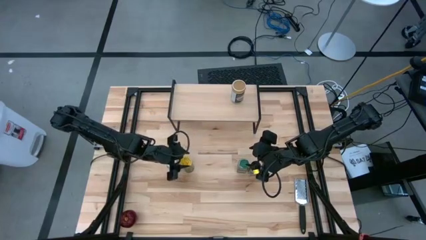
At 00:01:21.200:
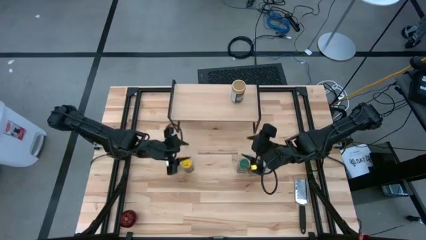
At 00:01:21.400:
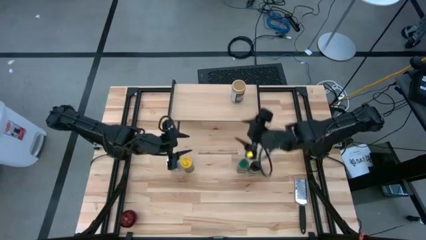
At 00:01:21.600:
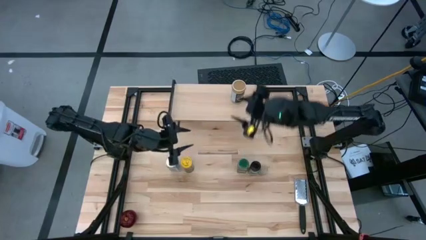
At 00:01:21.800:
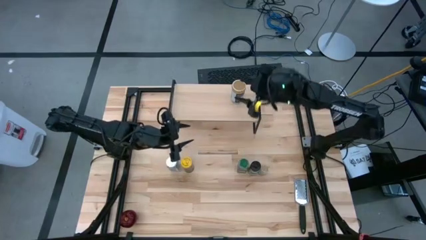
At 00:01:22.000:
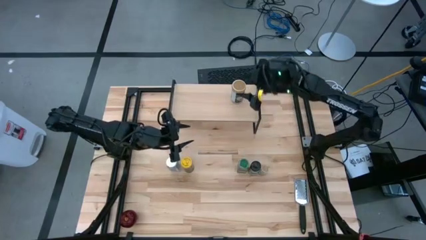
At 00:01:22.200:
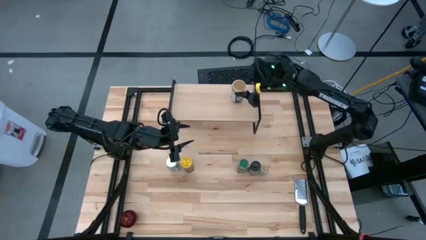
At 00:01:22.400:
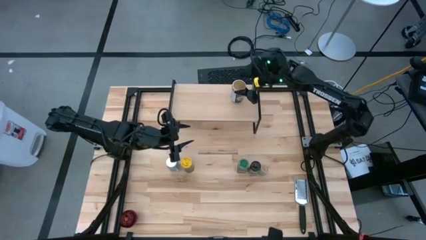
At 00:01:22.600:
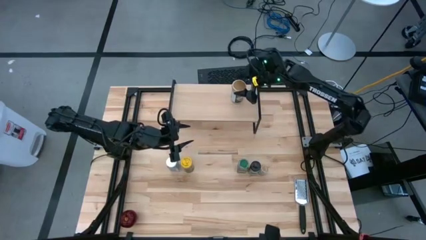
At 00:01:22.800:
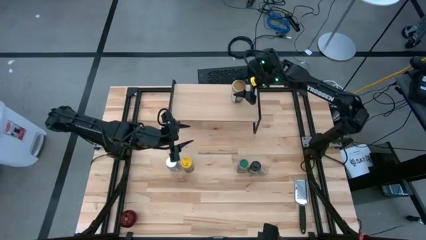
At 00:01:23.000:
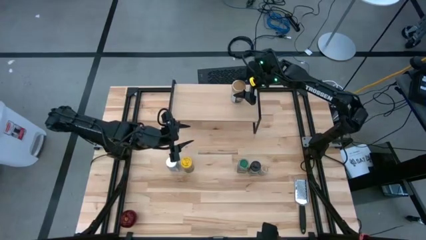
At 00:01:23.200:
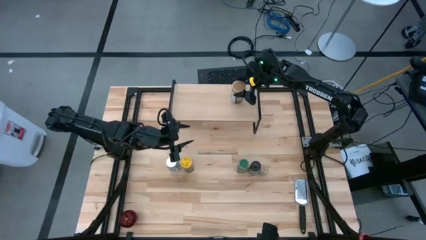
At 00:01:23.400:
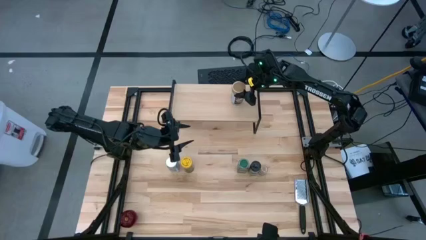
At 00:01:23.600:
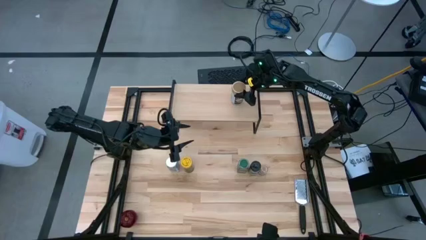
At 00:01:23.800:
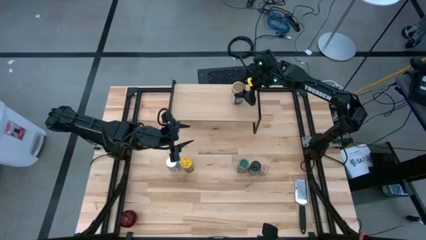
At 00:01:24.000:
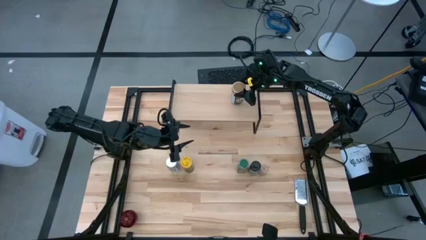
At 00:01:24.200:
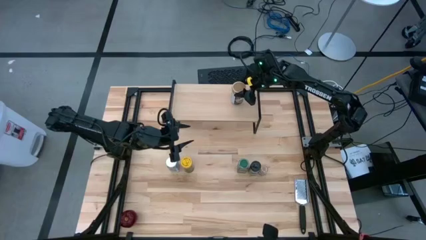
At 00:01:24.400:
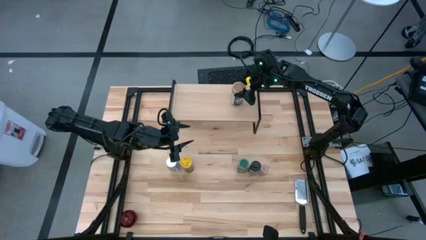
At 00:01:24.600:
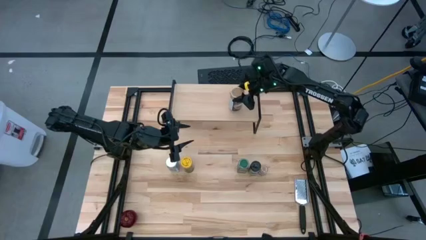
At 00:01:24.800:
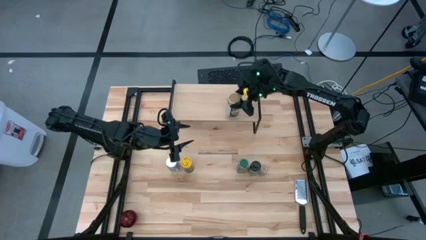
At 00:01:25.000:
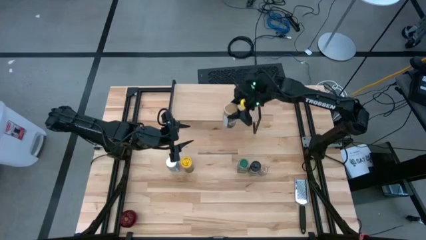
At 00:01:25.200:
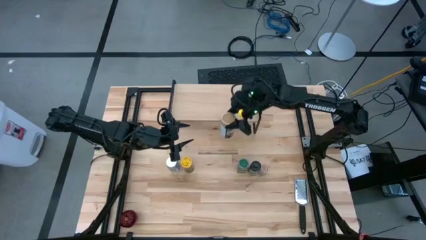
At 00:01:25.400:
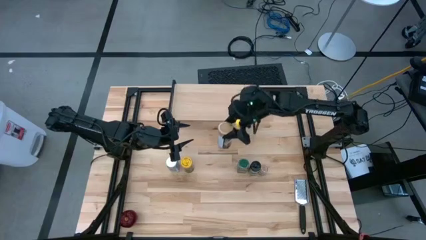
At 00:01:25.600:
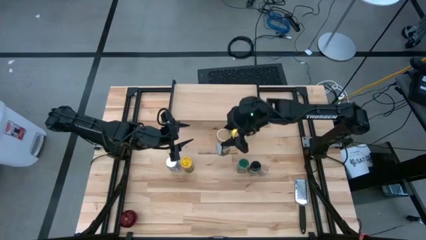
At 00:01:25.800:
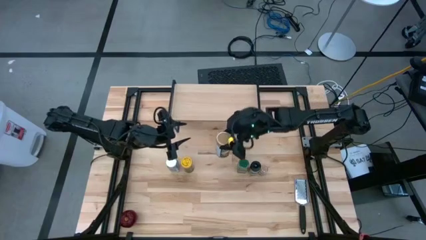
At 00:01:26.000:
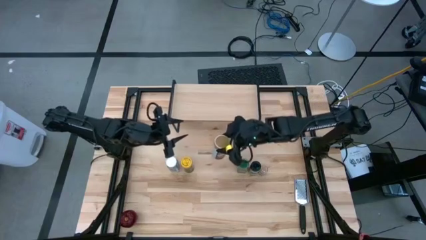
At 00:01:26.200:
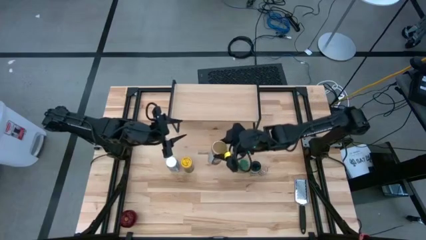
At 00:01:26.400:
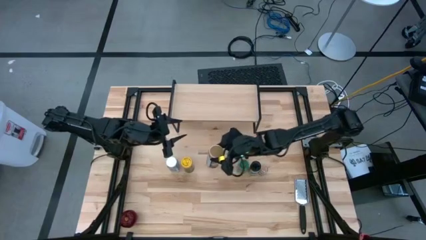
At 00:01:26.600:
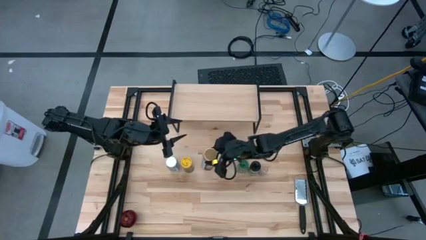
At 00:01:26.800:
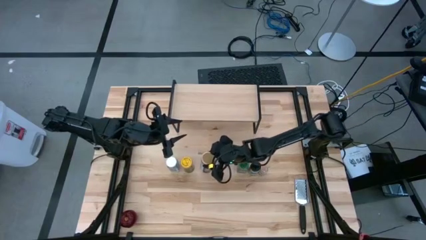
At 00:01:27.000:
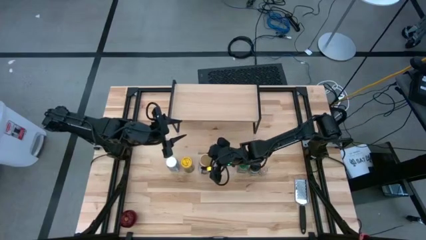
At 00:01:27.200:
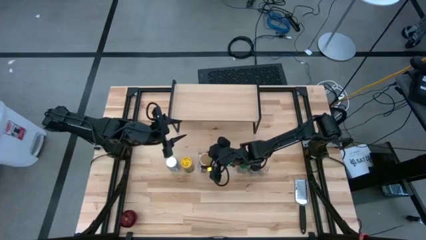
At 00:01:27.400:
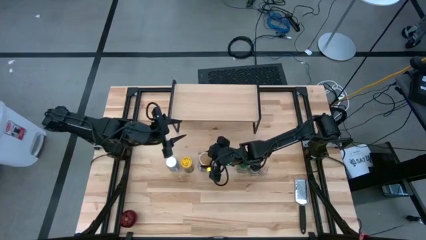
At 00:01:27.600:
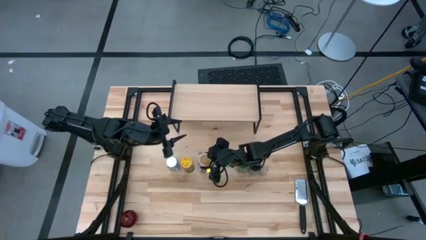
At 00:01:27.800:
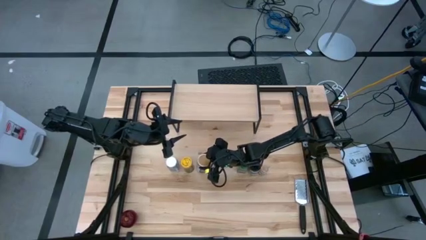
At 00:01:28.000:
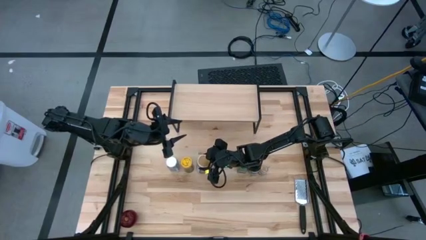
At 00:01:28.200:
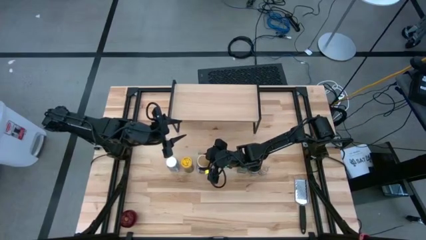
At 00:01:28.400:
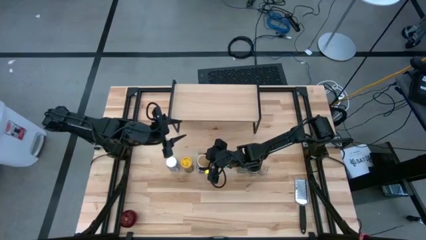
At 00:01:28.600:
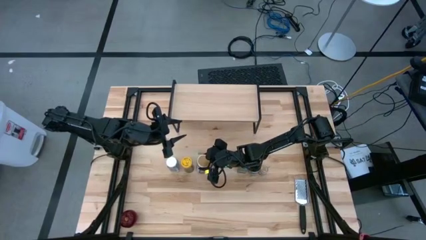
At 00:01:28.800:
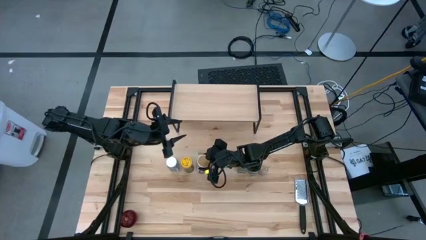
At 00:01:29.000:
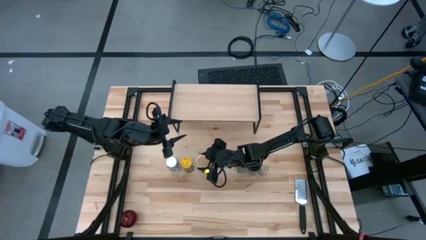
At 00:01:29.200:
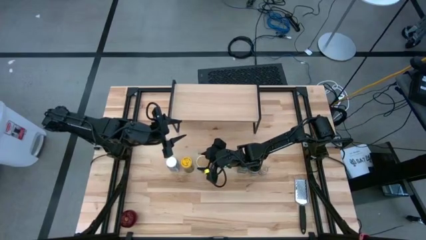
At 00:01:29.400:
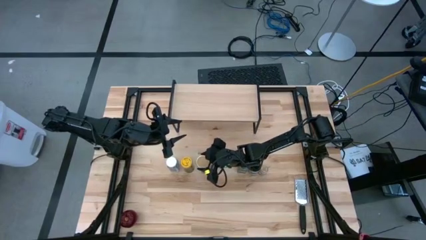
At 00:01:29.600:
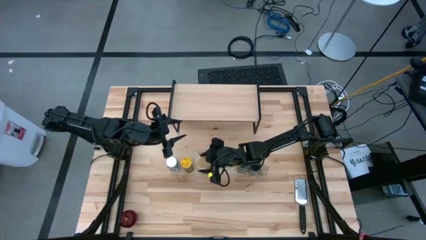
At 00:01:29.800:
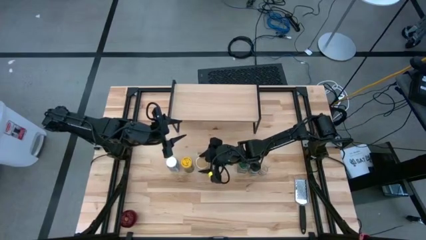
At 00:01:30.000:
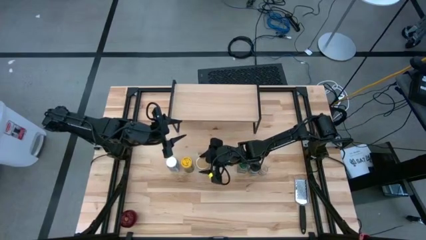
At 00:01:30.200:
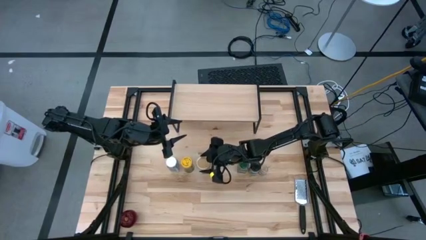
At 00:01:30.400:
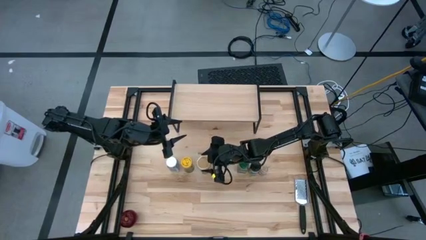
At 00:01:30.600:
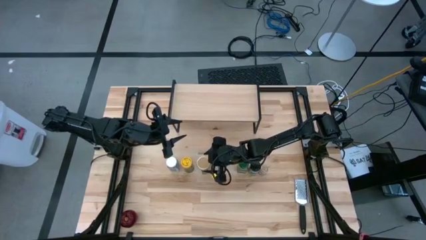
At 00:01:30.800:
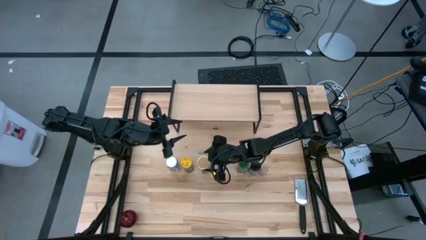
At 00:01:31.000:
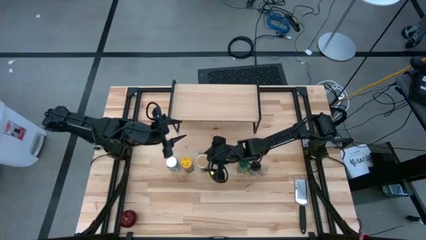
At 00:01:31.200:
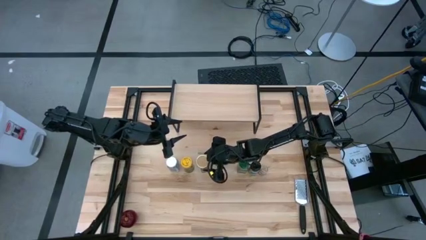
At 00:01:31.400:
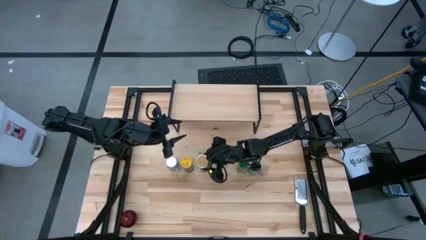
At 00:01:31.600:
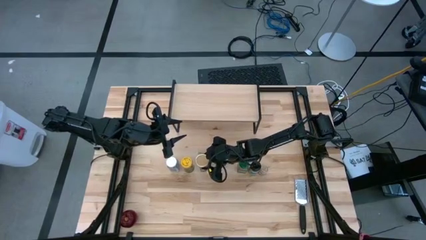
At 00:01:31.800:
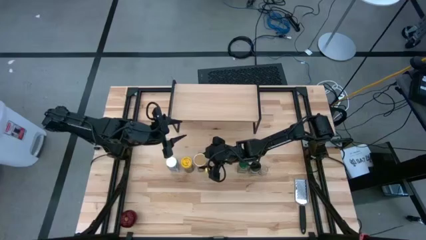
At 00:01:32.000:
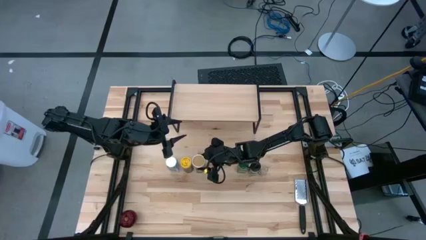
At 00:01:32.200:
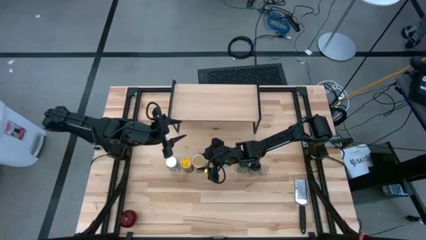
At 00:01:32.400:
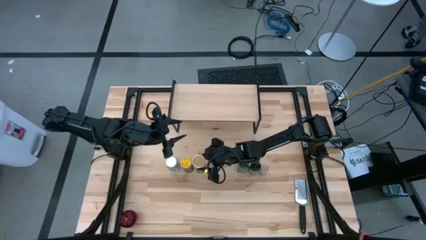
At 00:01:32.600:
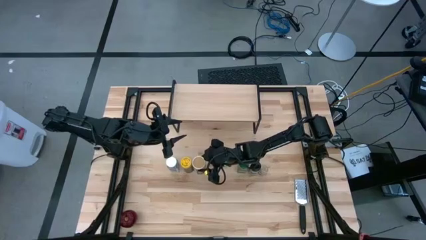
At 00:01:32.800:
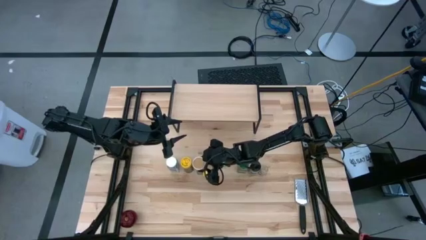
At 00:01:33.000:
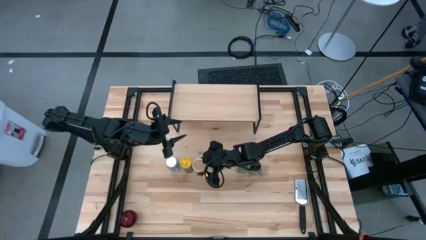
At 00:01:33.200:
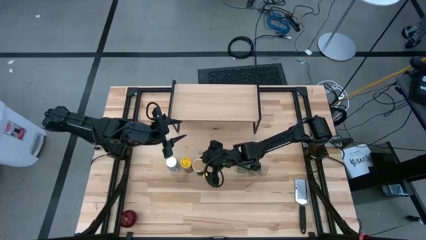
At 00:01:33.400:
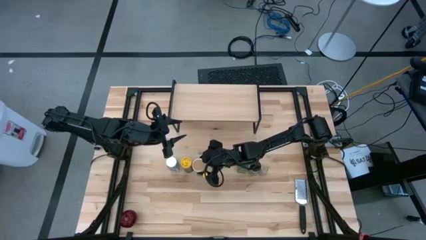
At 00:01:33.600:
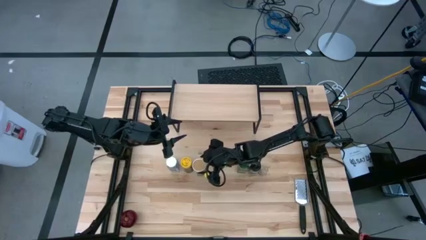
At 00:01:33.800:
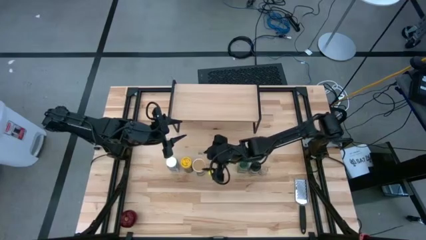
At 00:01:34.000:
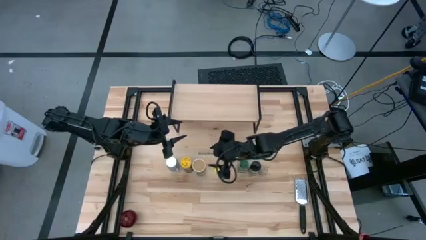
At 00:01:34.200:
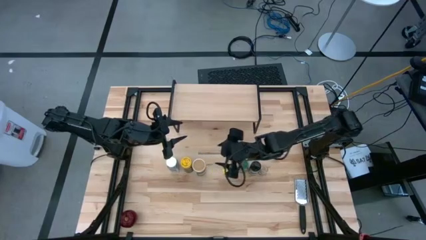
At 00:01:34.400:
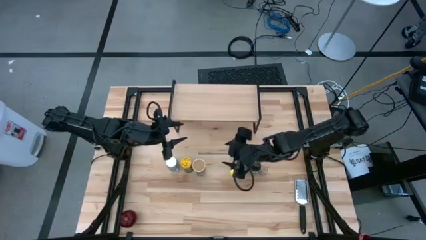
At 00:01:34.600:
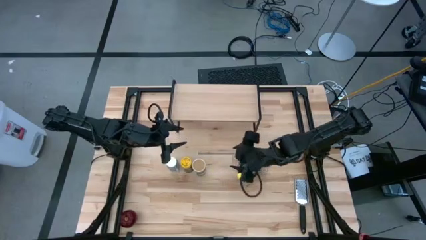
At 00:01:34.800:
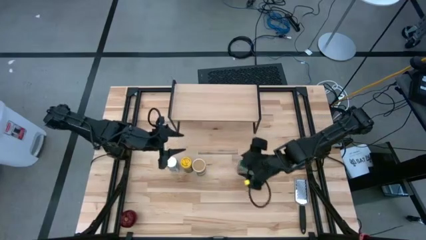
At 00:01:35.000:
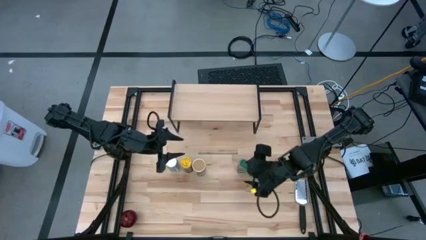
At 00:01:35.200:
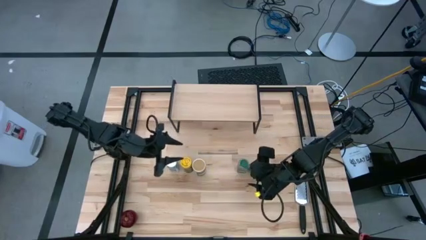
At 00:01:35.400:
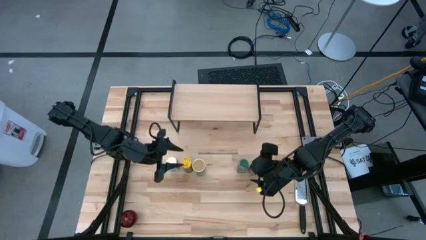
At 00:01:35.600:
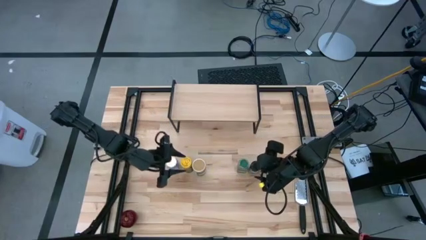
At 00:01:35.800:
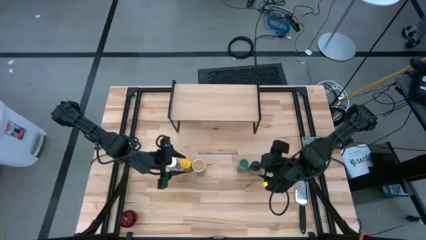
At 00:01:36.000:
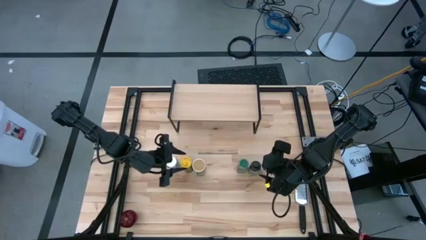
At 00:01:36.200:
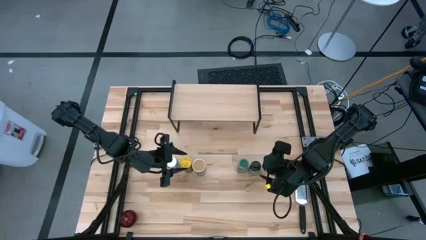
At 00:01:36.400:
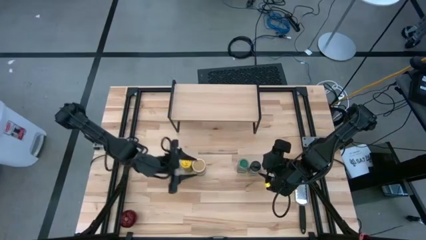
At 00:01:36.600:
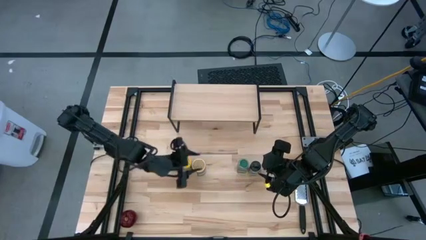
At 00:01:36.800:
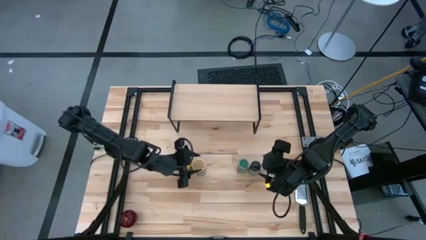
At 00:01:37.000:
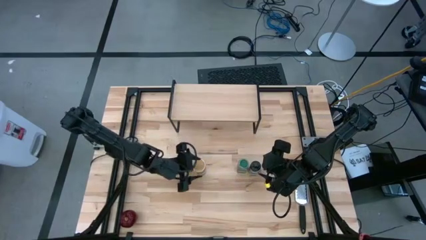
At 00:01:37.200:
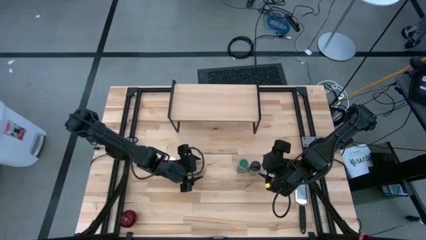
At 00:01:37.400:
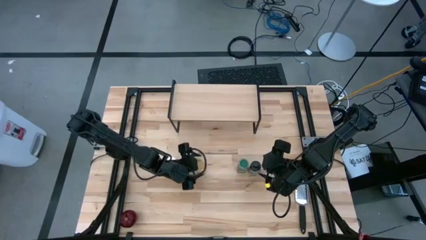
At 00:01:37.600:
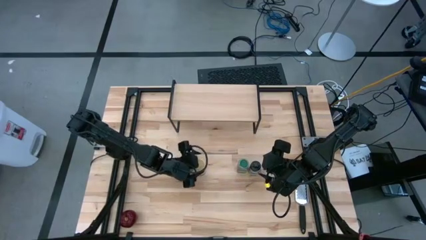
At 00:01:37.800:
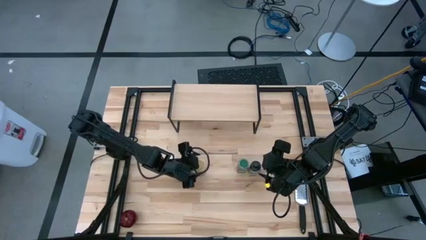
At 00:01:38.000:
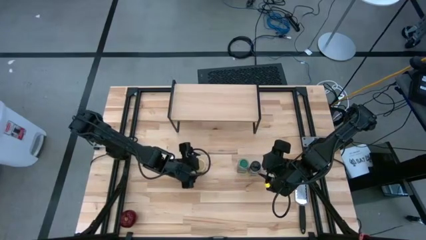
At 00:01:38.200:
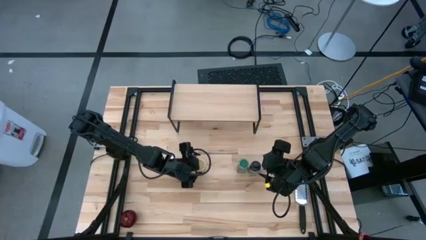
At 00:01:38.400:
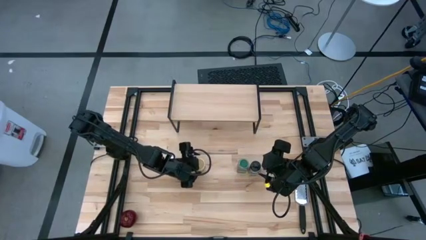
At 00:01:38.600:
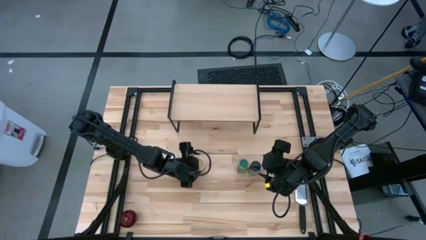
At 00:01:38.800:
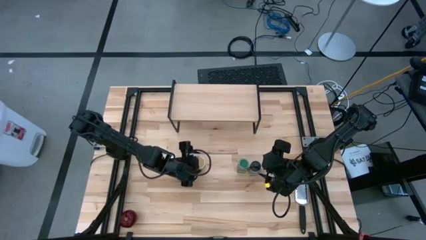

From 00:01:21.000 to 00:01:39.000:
Task: Shelf spices
Remove the brown seasoning bottle from the shelf
